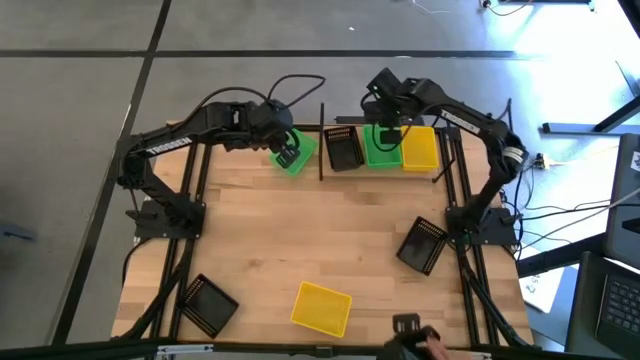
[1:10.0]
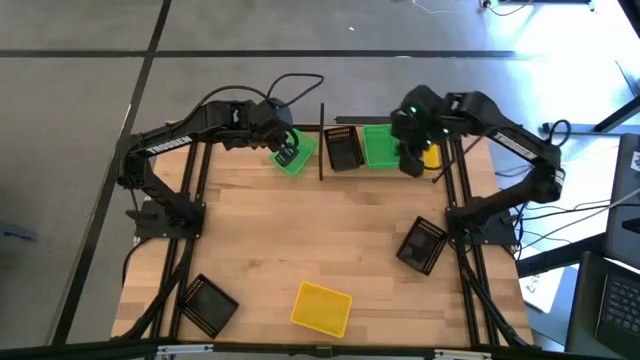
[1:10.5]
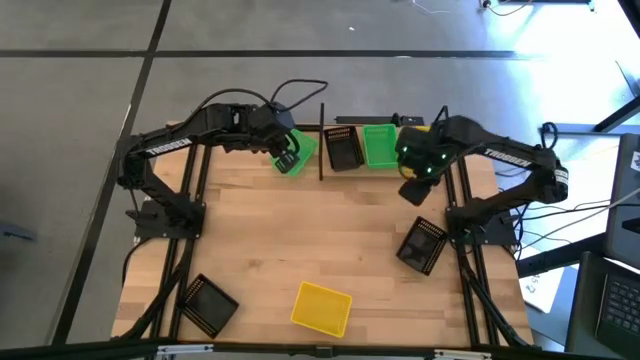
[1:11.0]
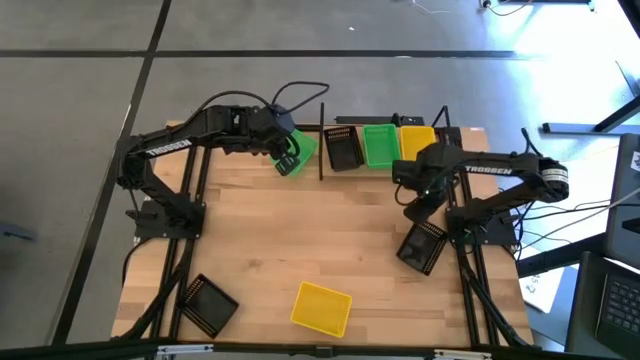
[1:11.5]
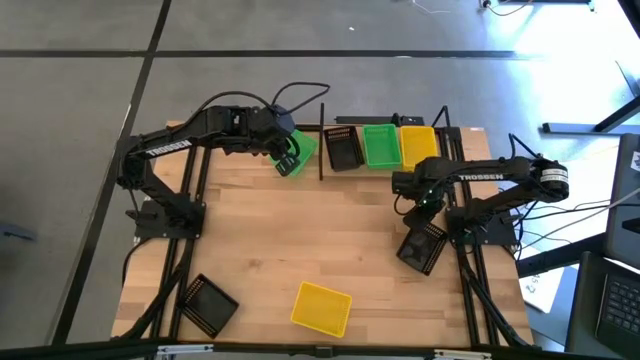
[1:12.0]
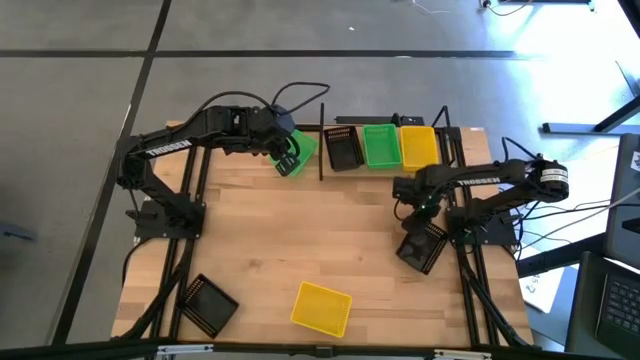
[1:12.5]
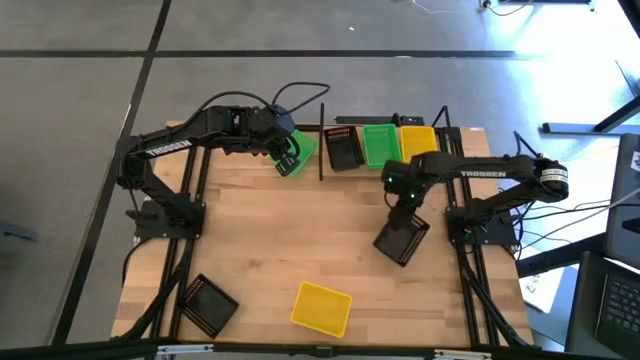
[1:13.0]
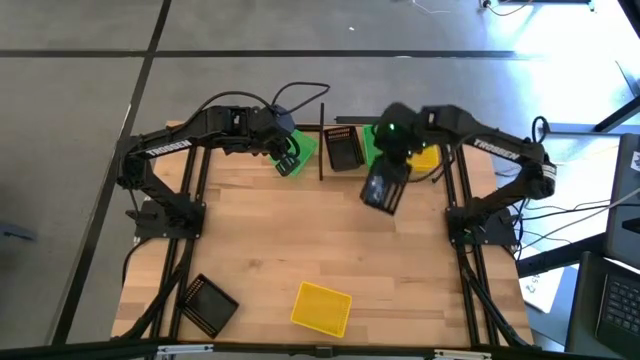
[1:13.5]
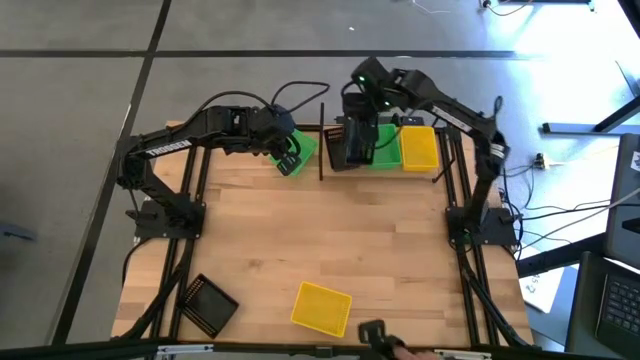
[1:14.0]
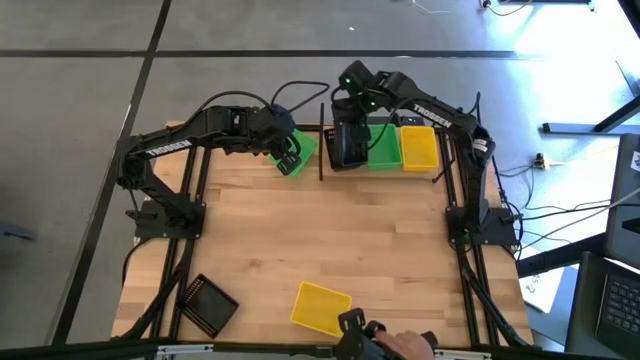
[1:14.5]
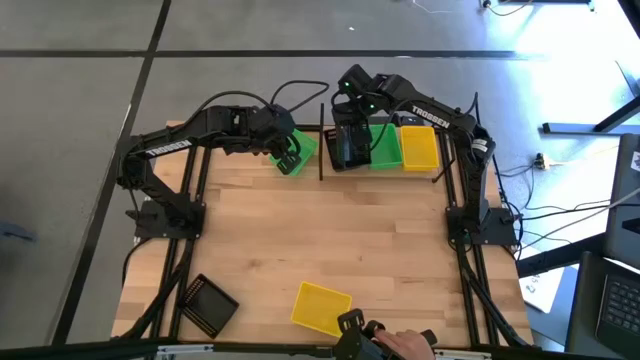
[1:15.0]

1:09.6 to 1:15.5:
Task: Stack baskets on shelf by color
Stack the top black basket on the black basket on the shelf

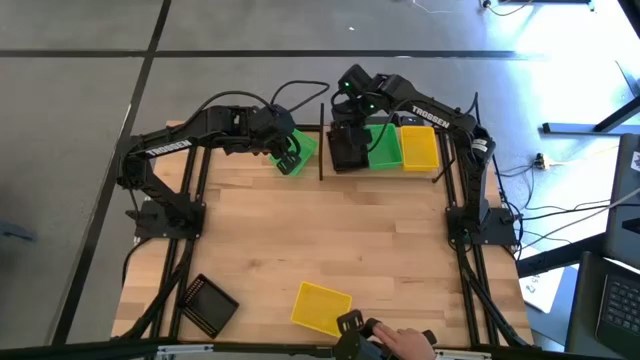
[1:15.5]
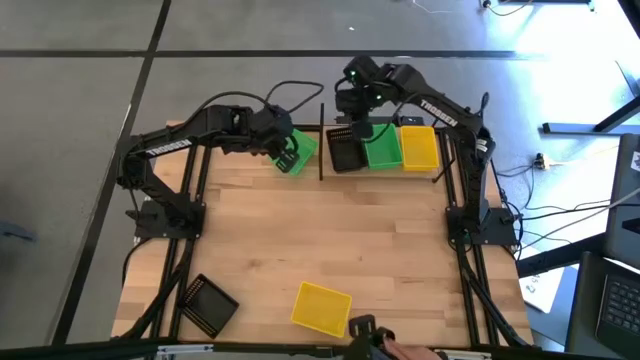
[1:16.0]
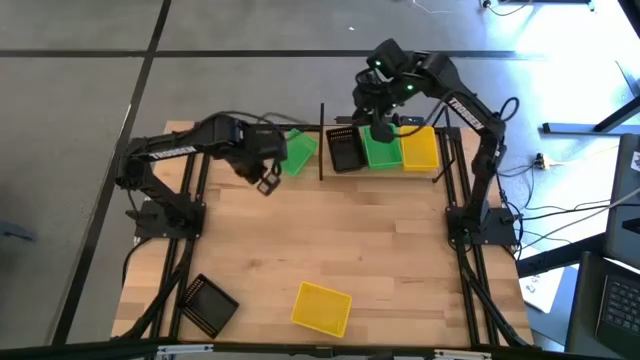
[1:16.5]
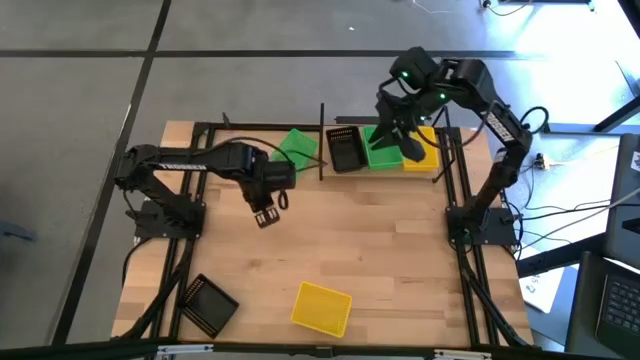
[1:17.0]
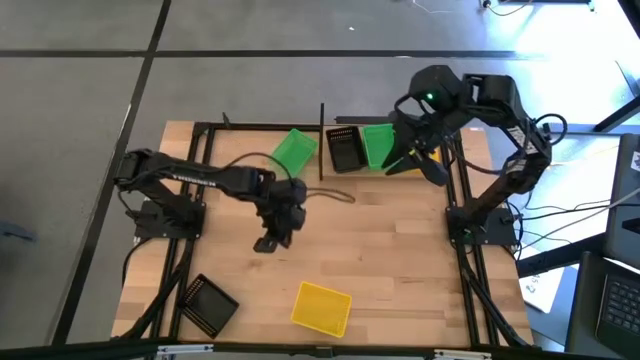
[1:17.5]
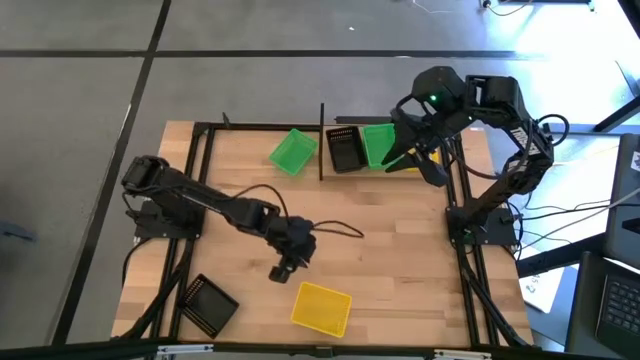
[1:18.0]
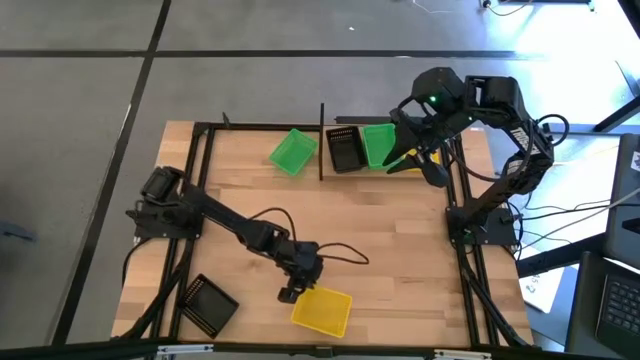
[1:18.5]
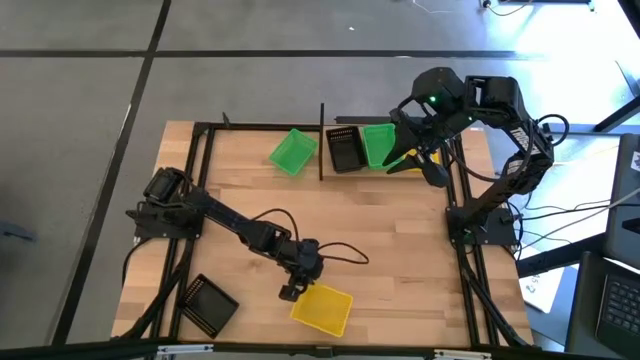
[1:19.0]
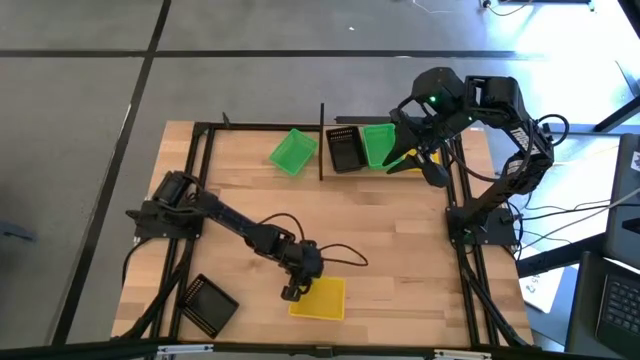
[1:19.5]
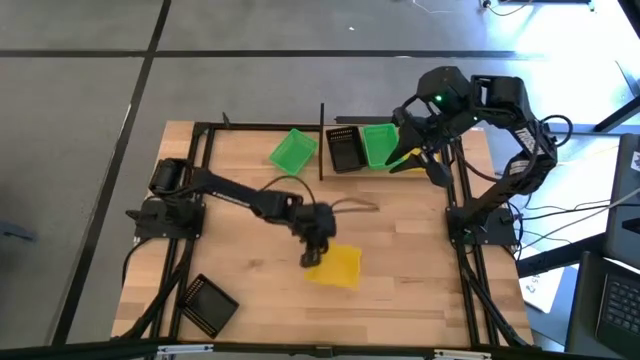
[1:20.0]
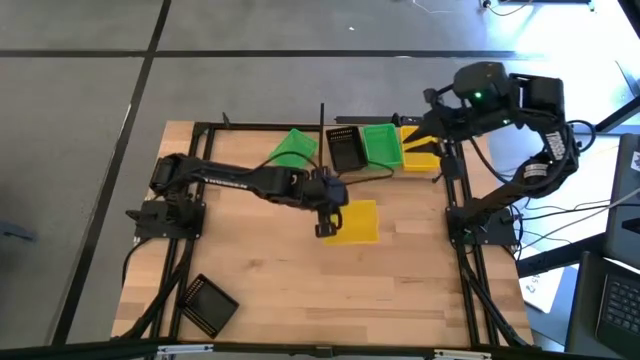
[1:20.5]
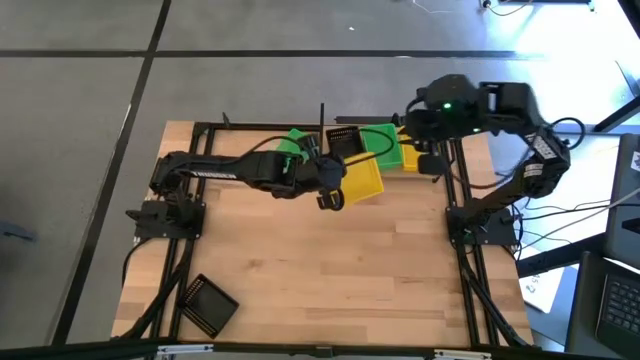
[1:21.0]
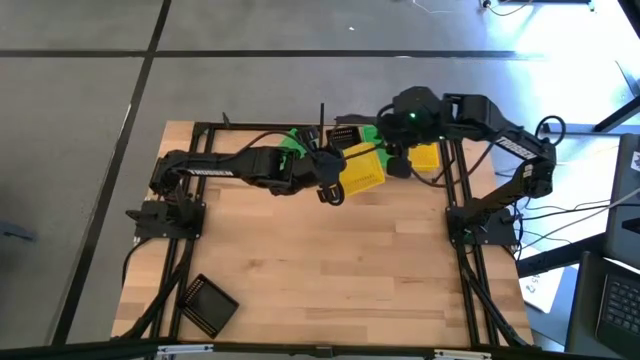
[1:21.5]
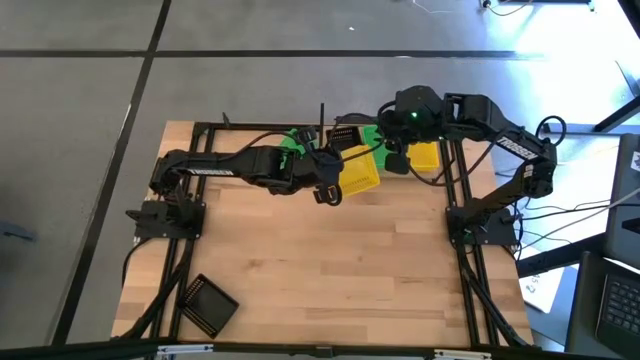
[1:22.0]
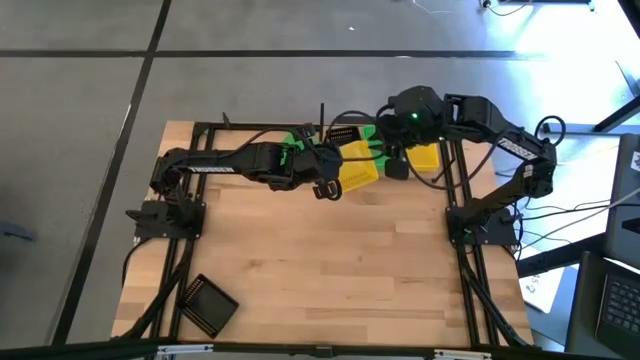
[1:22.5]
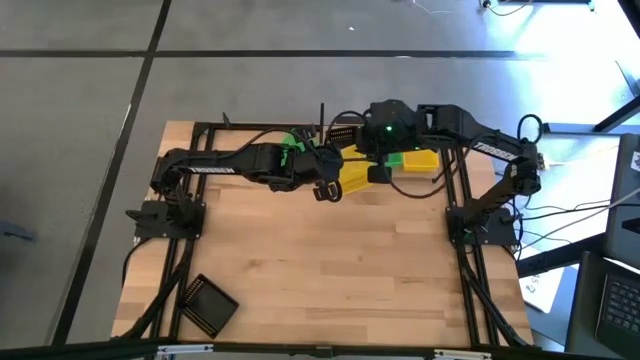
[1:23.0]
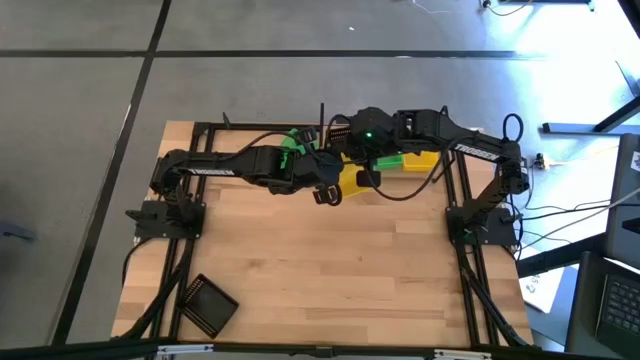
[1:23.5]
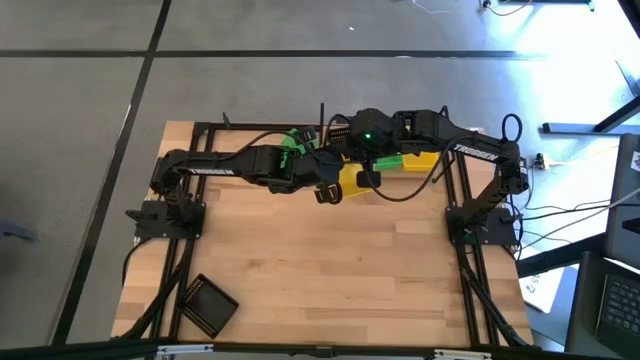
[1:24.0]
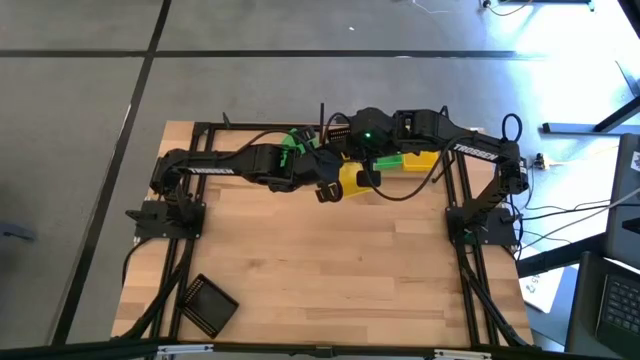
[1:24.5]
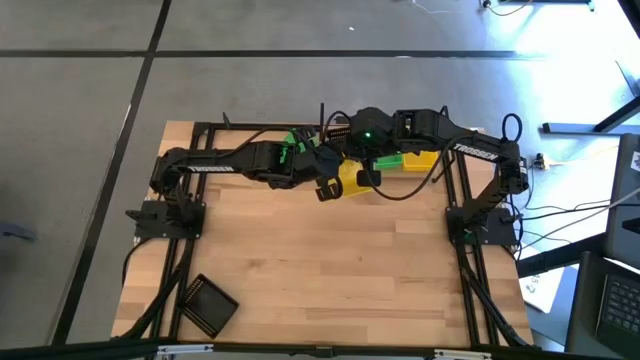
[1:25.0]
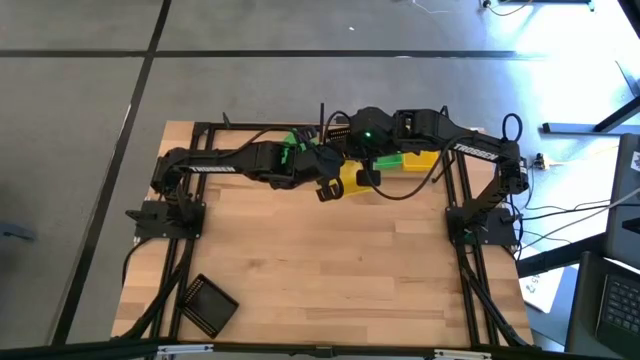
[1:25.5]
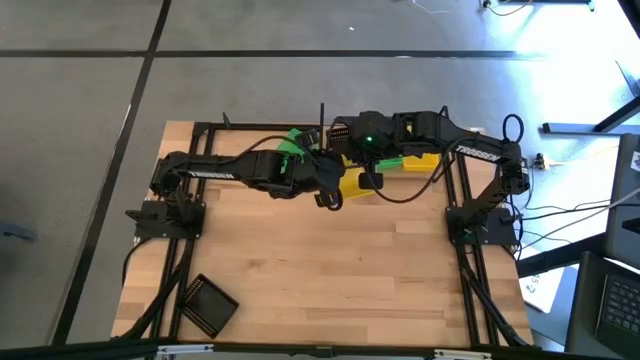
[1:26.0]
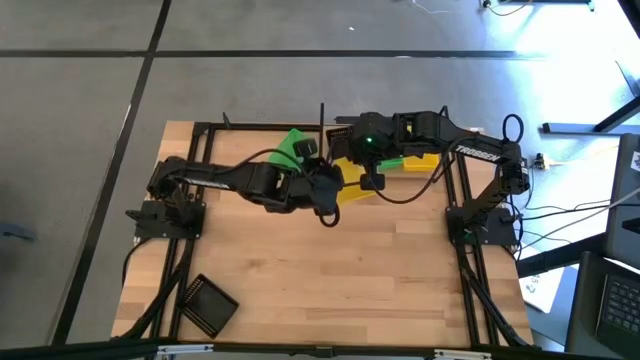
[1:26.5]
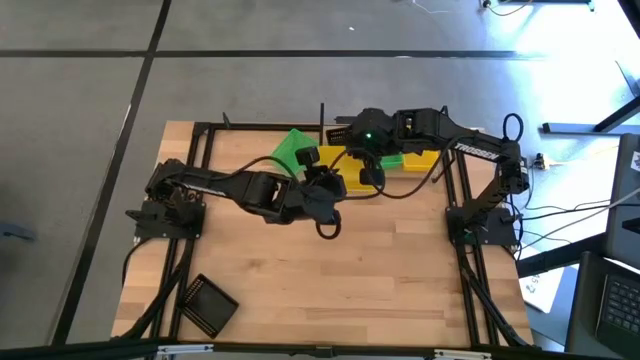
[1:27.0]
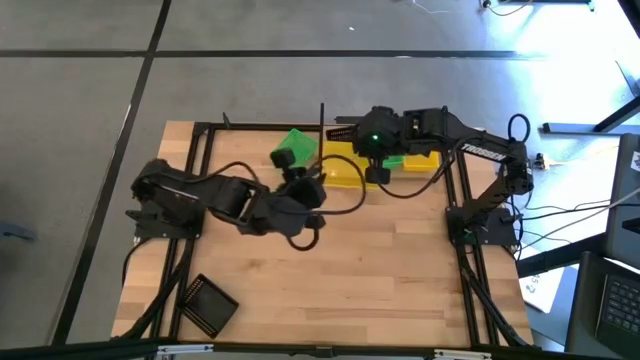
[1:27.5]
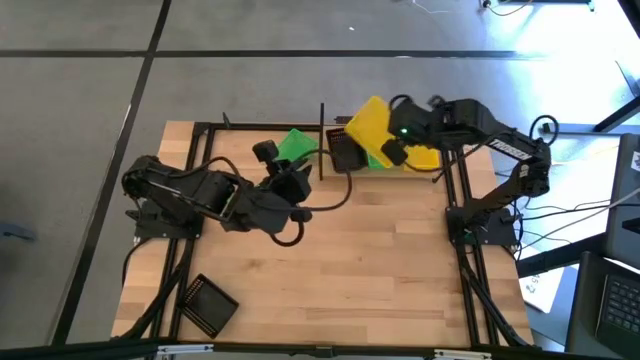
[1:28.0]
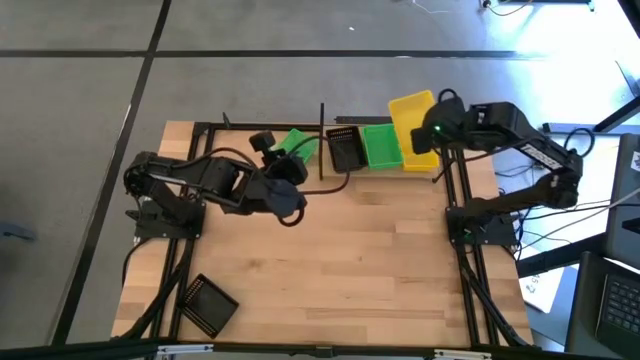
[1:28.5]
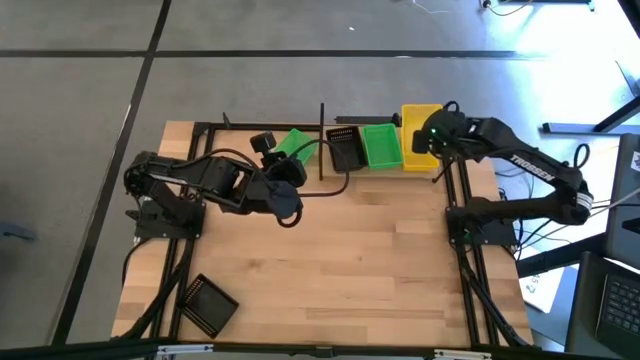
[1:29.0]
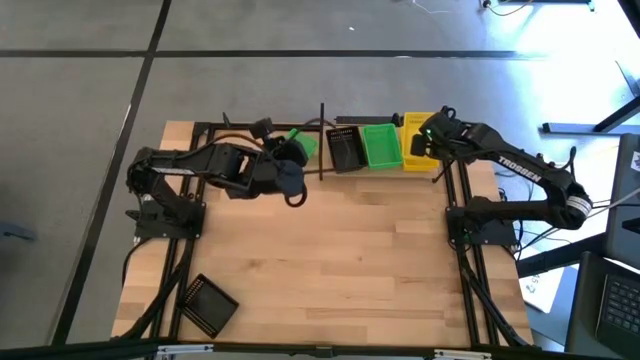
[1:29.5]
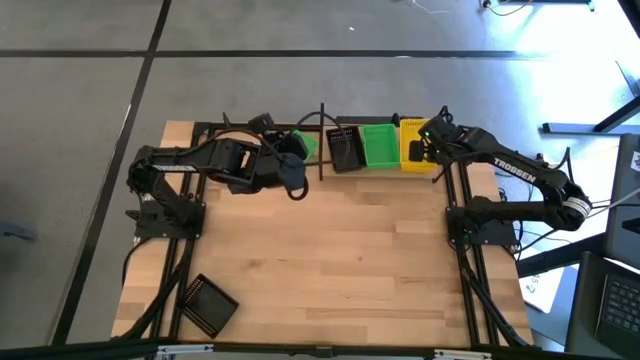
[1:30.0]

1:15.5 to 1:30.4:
Stack the yellow baskets on the yellow baskets on the shelf

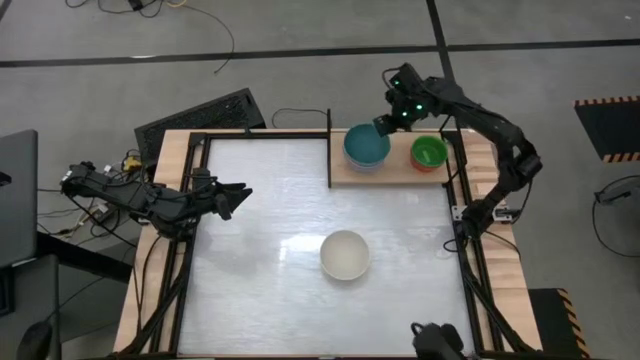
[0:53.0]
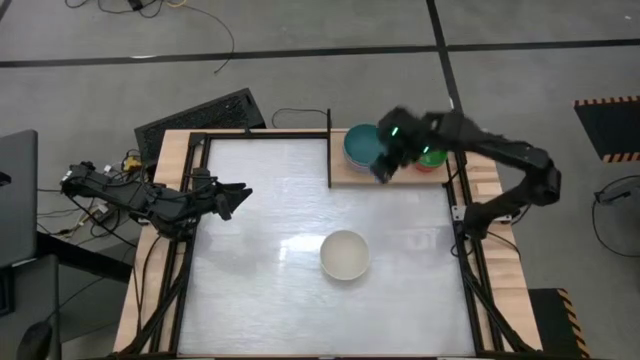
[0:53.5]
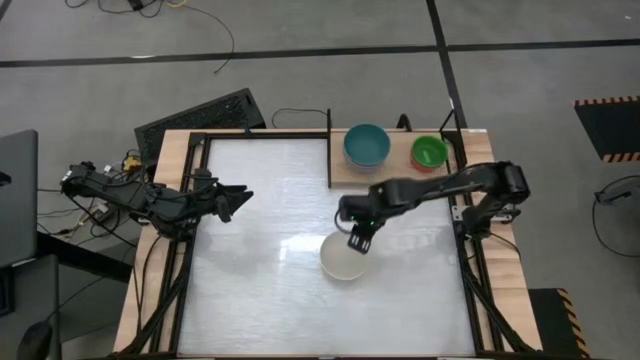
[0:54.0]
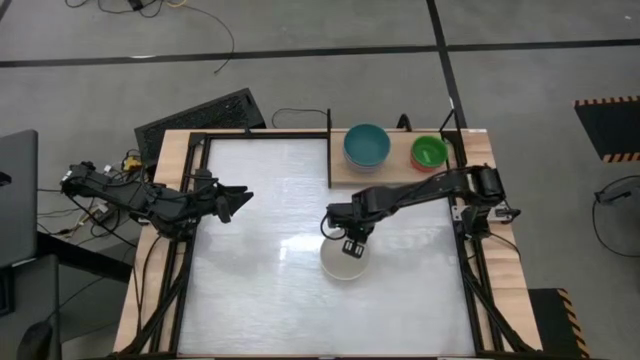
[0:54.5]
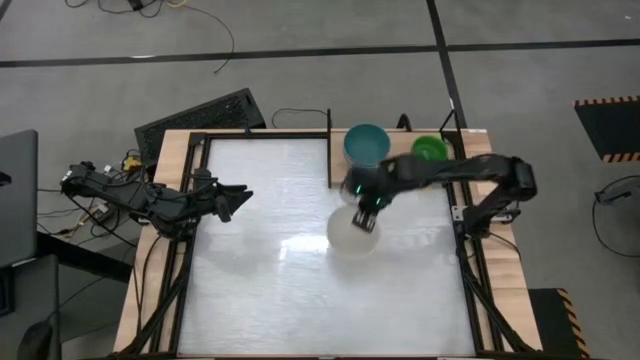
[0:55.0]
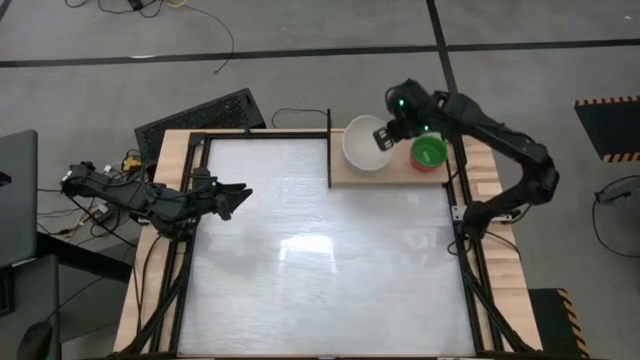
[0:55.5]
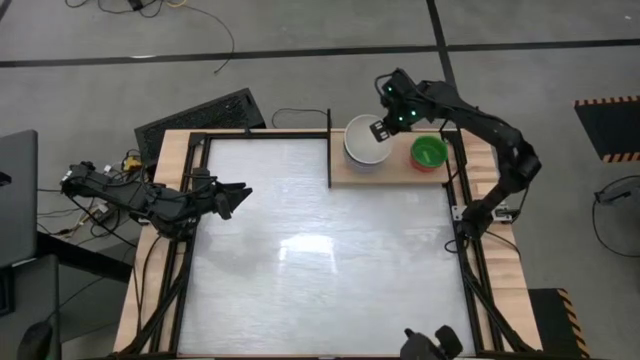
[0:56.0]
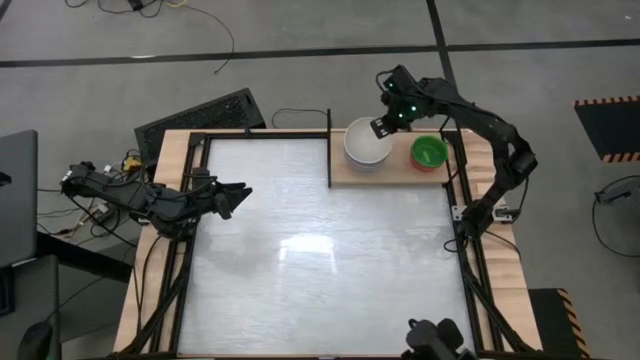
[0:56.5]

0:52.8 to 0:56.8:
Task: Place and stack bowls onto a shelf
Stack the white bowl on top of the green bowl on the shelf
